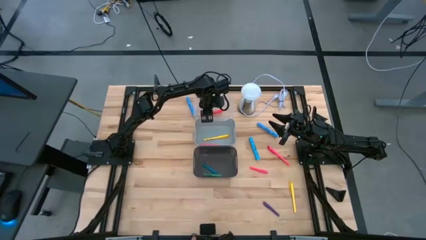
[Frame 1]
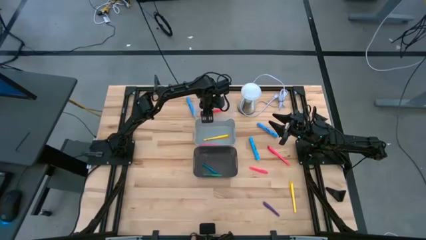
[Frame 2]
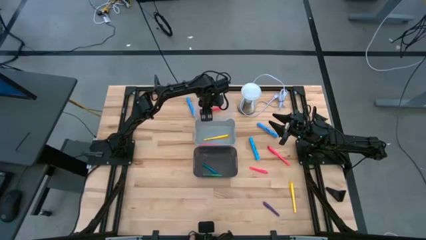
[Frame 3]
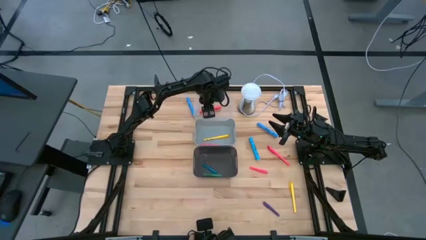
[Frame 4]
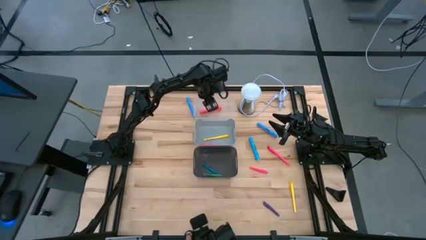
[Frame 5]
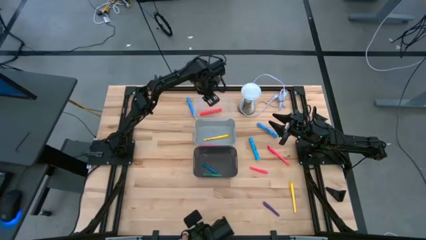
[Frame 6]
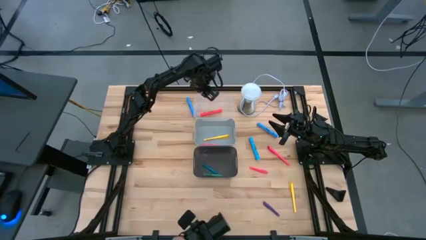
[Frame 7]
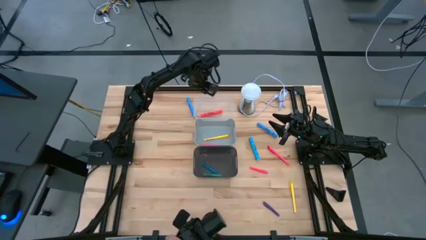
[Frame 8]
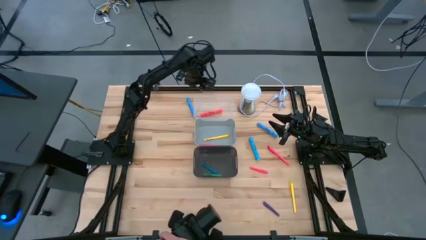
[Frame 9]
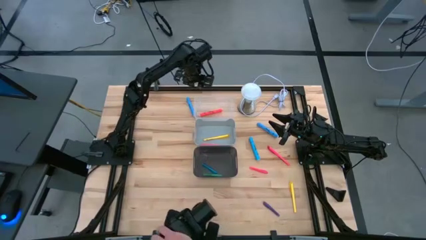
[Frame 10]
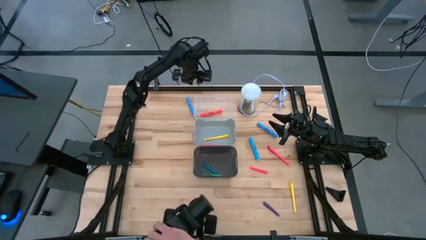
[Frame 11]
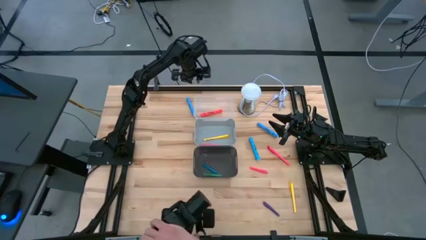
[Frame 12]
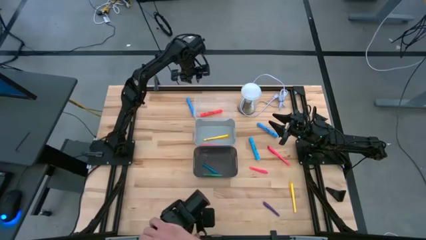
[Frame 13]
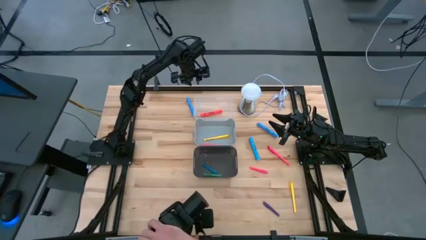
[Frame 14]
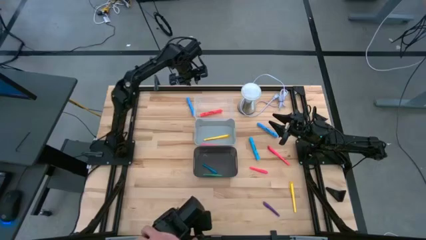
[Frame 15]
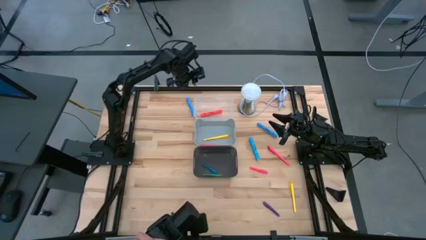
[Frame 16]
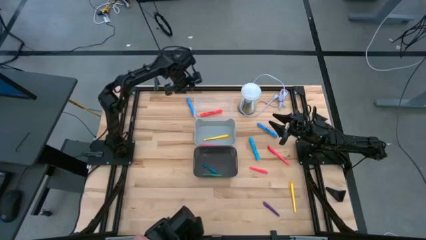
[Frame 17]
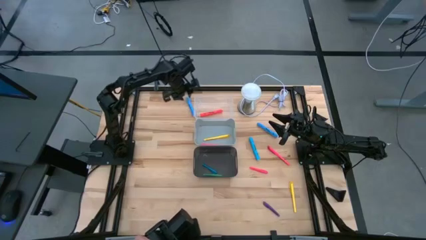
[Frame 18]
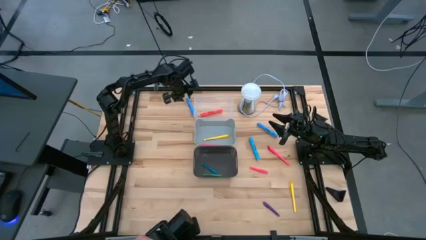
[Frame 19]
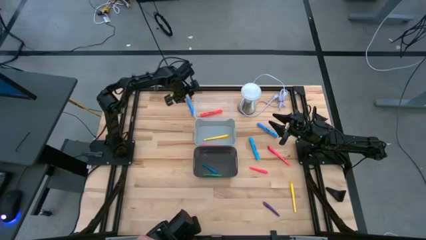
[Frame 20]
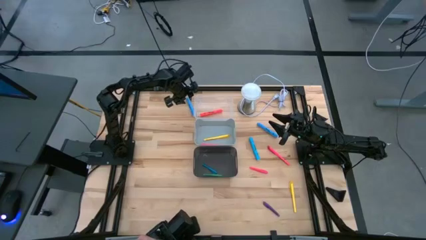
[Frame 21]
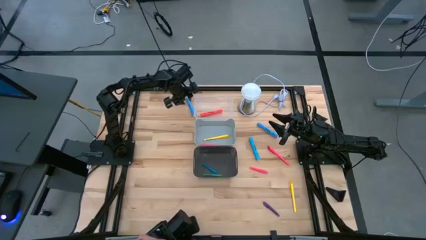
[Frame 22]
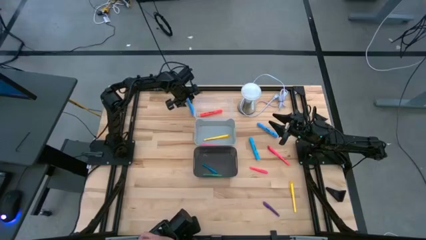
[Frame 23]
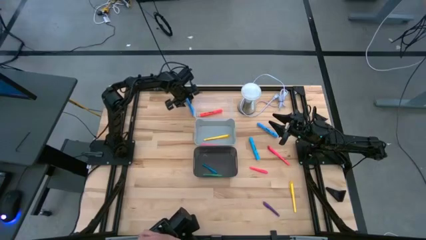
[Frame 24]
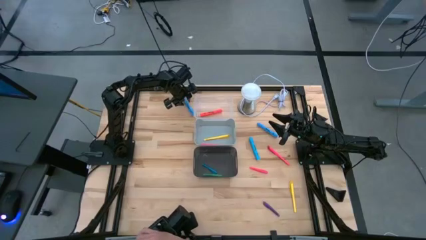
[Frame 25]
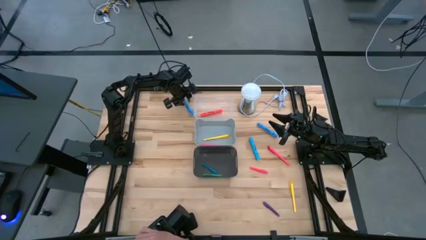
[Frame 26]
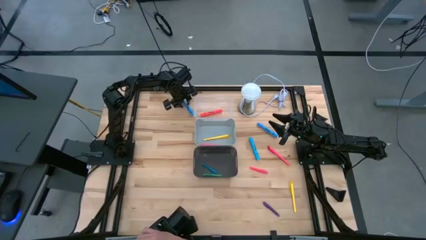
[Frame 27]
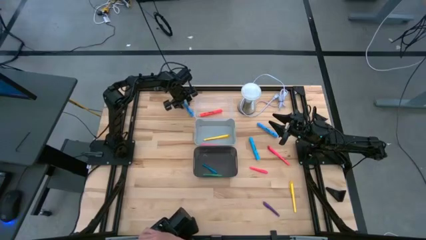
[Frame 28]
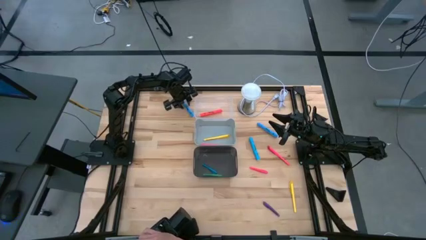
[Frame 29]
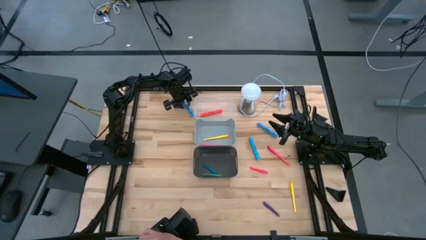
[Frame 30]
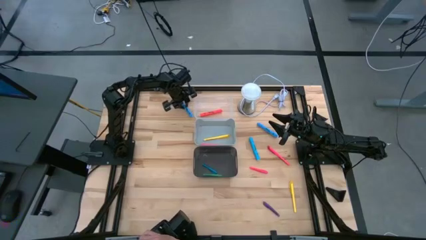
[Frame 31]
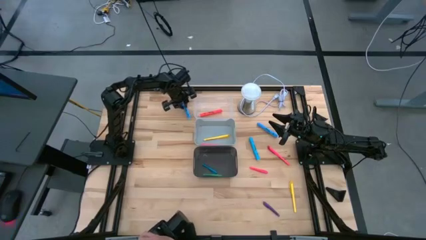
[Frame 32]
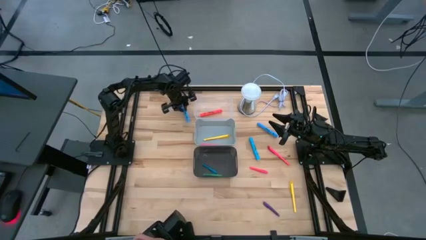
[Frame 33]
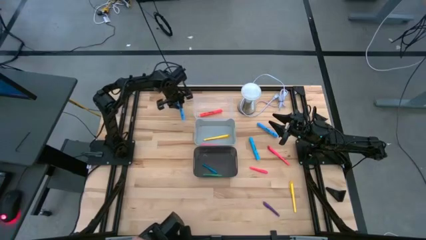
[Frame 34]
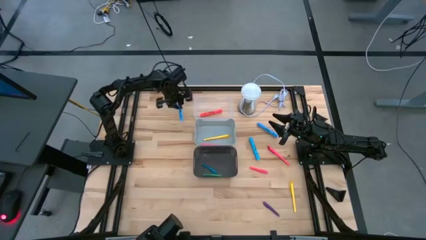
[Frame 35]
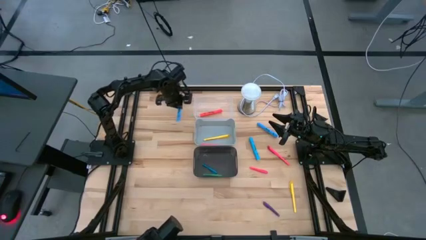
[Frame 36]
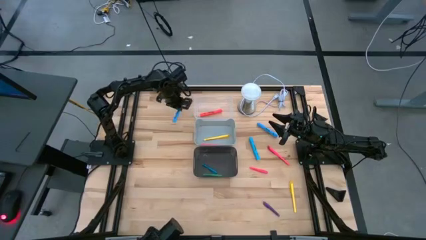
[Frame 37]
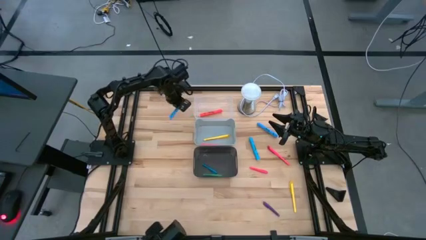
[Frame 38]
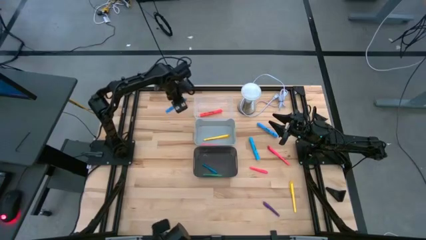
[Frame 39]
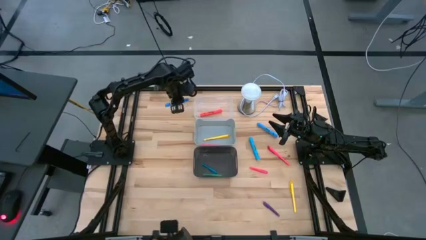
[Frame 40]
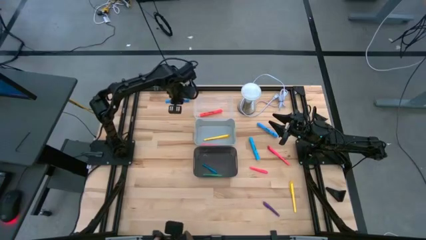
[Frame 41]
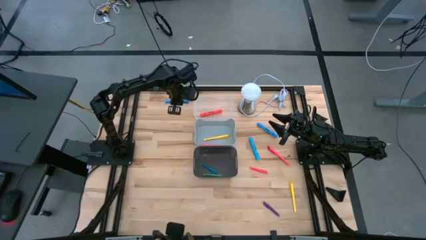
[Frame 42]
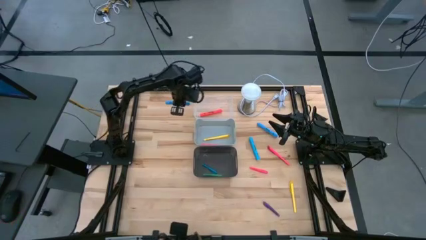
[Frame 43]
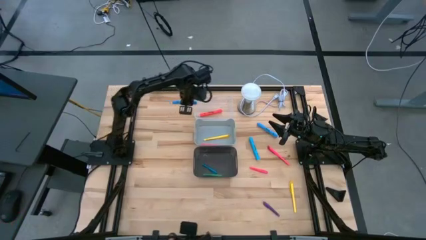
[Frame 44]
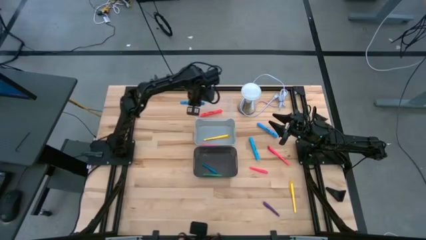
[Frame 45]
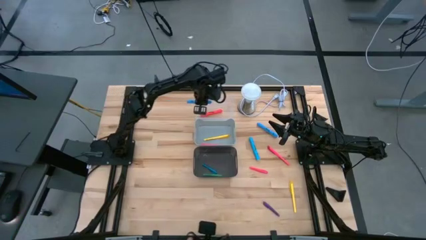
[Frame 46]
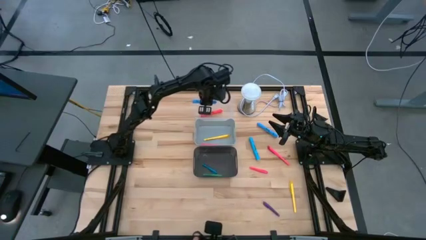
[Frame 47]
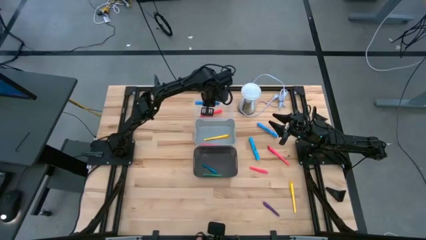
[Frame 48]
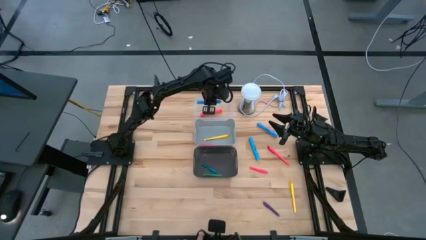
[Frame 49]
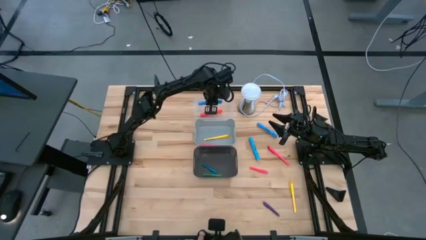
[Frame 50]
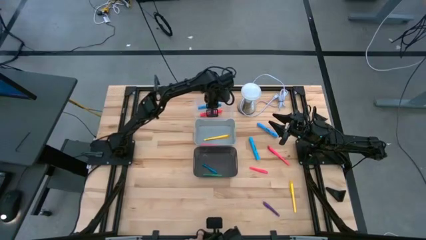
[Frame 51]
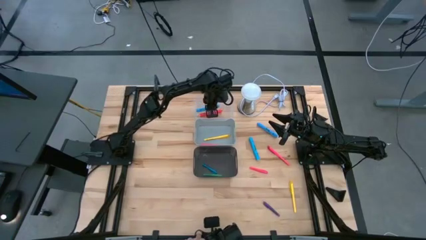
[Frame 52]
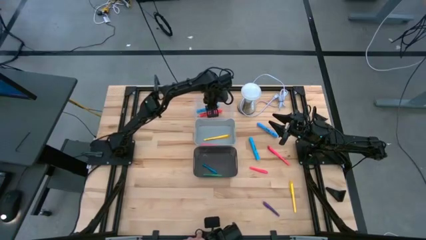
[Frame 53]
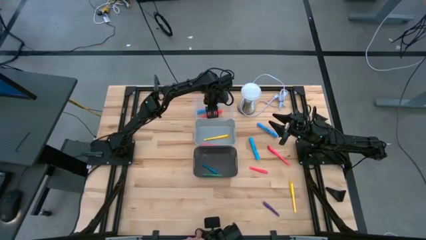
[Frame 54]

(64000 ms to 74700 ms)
Task: Pick & Place Markers
Put the blue highlighter into the transparent bin

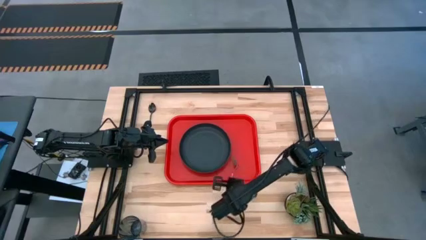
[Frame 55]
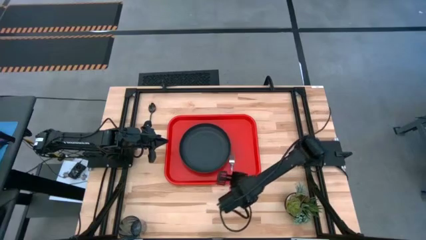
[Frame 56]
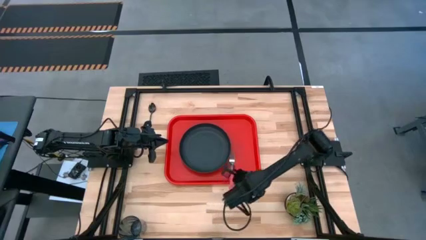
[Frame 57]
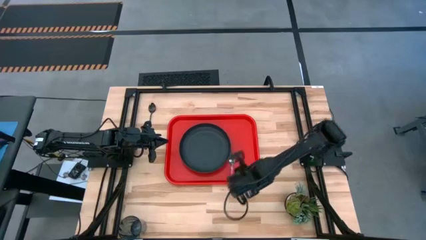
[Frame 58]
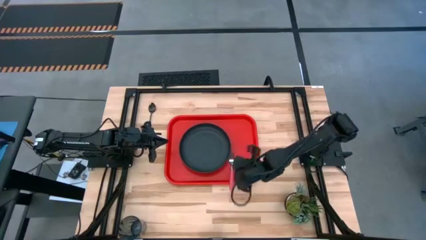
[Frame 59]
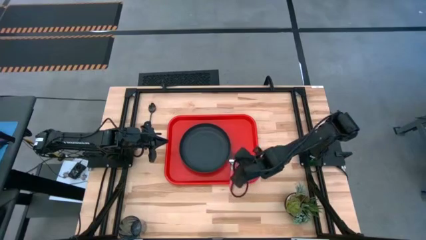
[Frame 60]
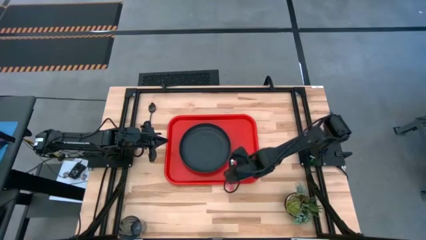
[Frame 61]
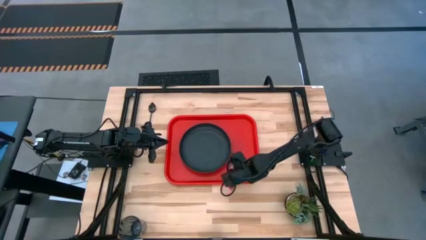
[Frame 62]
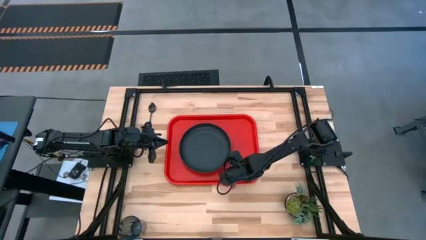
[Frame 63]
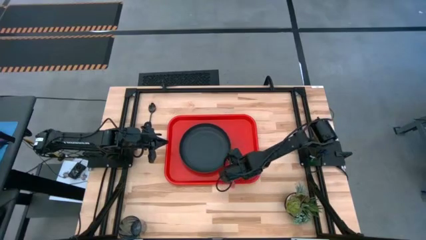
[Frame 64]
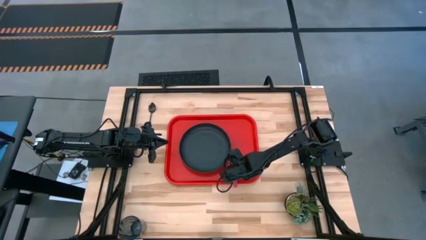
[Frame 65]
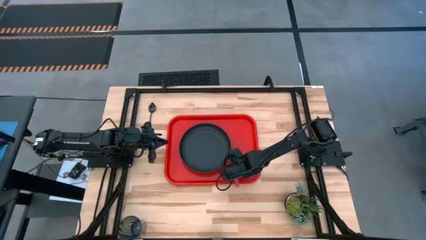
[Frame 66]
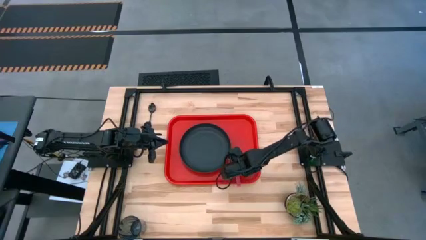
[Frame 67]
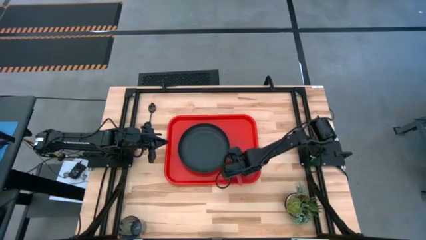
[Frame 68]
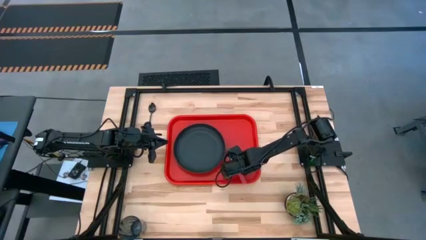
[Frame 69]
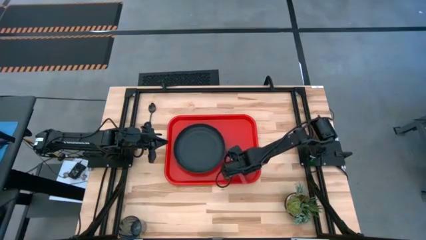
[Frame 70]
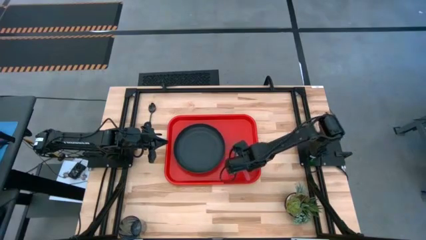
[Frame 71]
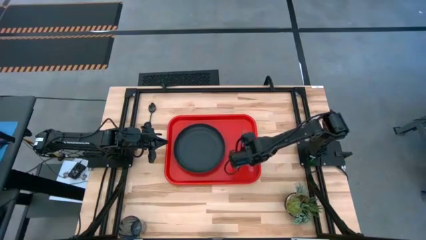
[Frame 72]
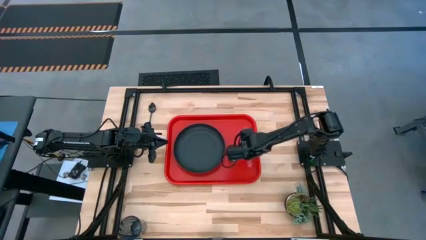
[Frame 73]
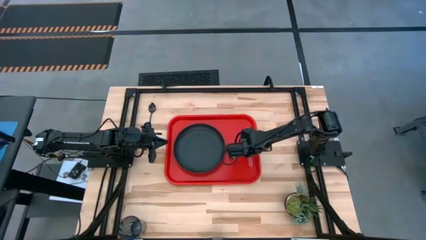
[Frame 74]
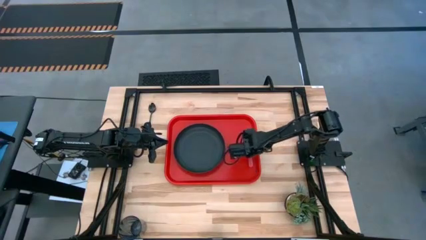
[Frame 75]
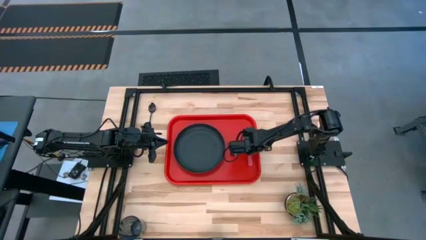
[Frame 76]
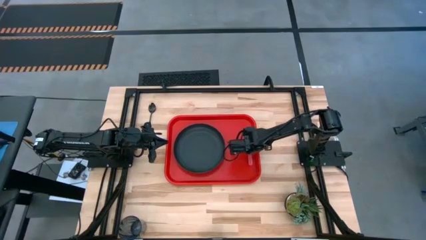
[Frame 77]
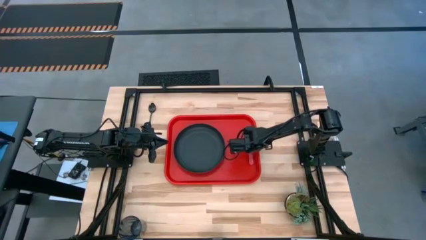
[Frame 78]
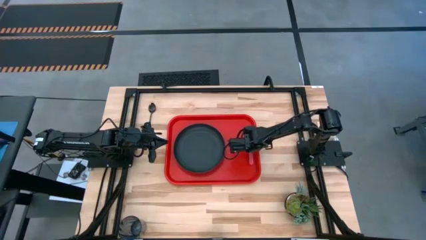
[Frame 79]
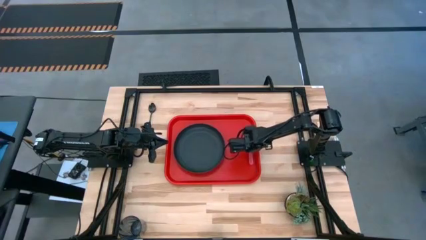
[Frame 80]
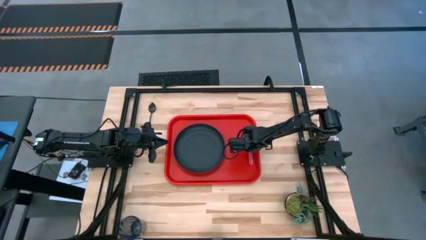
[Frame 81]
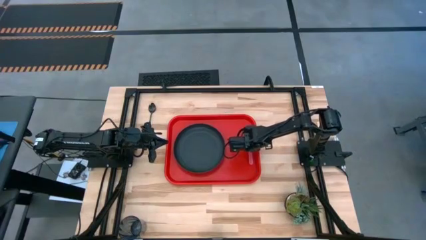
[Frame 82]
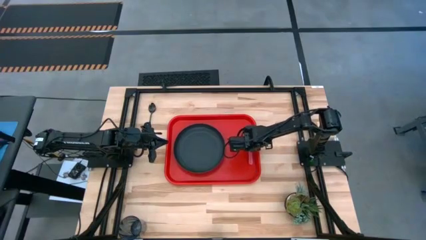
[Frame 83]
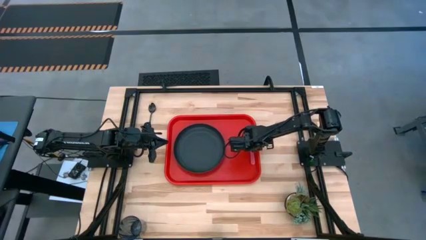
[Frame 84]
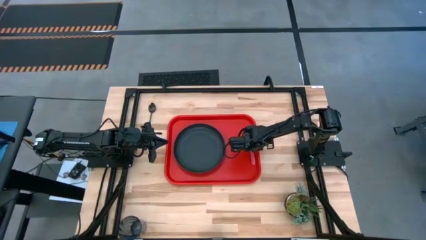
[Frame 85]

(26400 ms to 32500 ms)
Task: Pick and place plate/cup/fork/spoon on tray
Put the pink fork on the red tray to the right of the black plate
